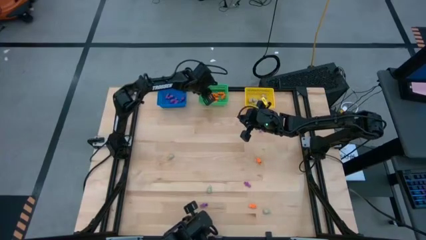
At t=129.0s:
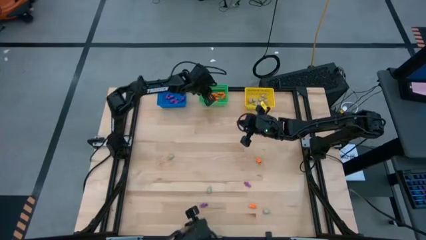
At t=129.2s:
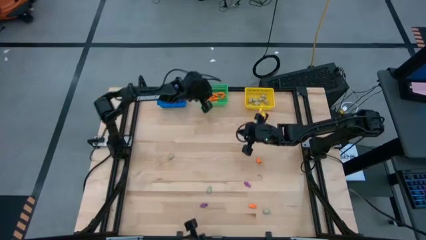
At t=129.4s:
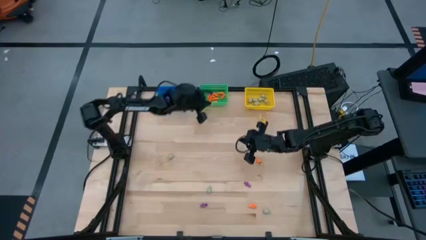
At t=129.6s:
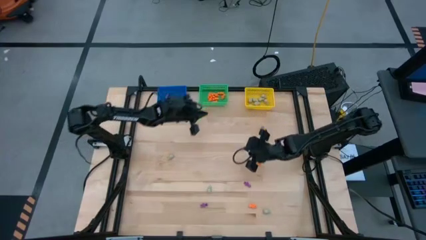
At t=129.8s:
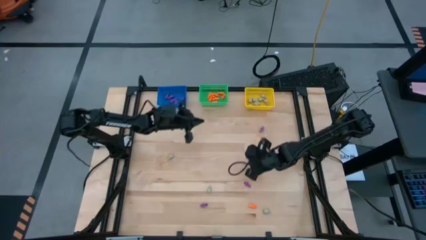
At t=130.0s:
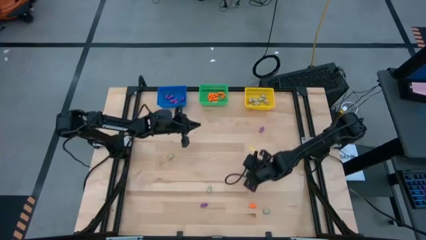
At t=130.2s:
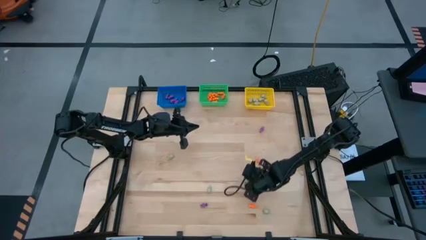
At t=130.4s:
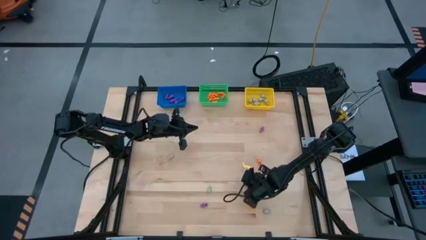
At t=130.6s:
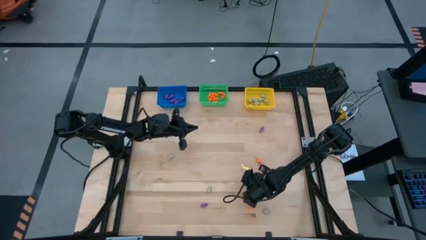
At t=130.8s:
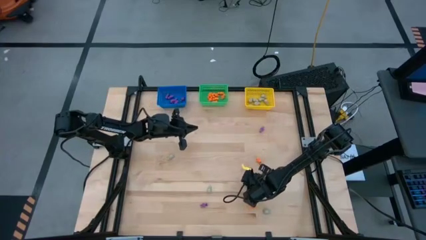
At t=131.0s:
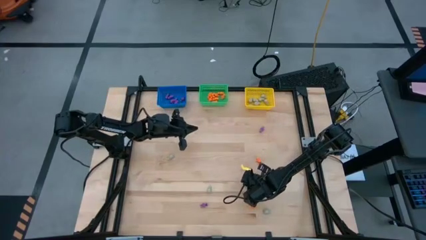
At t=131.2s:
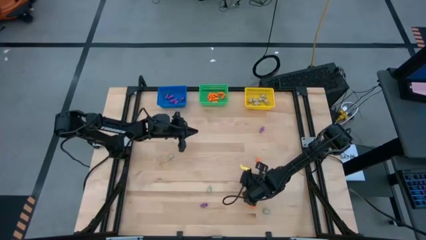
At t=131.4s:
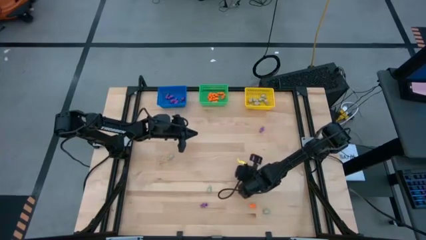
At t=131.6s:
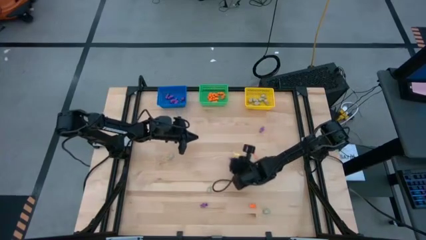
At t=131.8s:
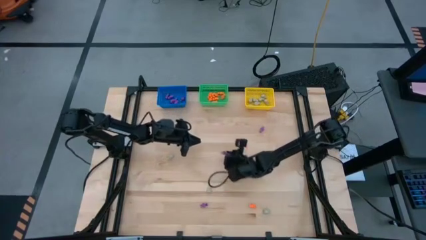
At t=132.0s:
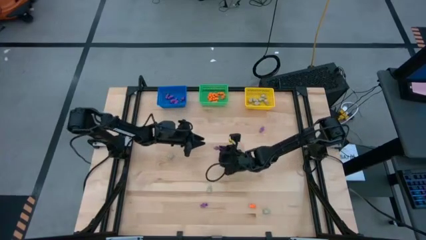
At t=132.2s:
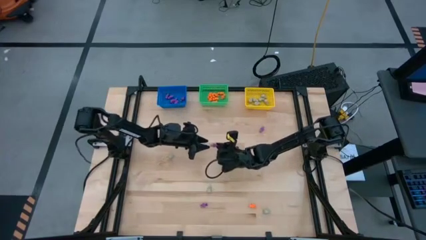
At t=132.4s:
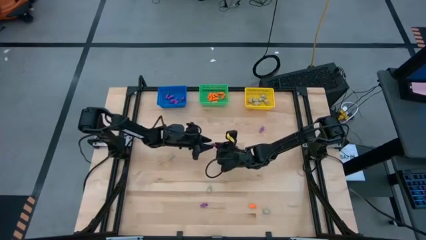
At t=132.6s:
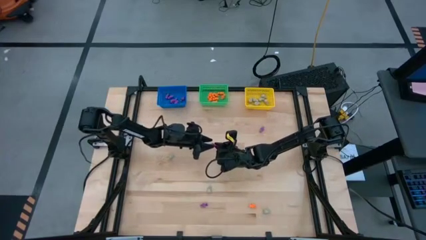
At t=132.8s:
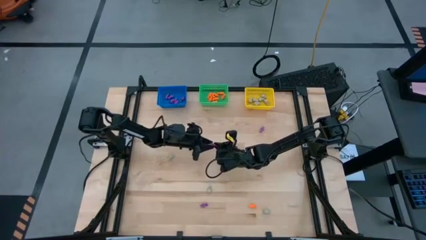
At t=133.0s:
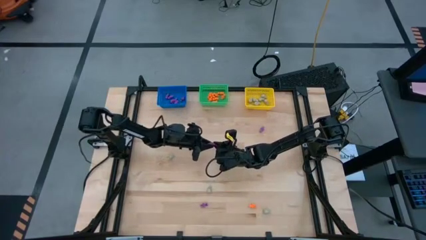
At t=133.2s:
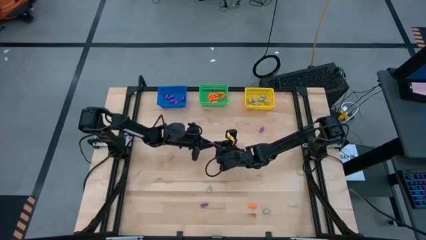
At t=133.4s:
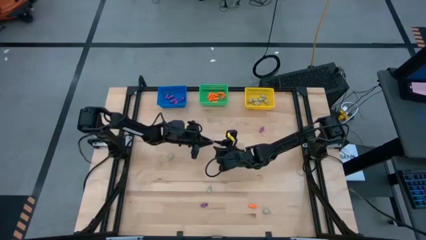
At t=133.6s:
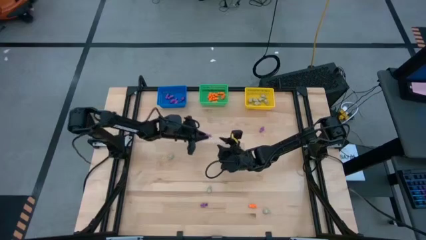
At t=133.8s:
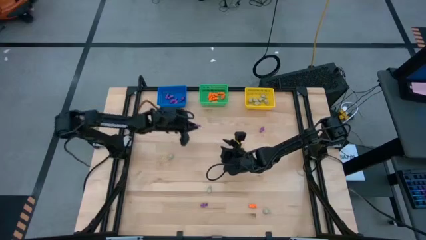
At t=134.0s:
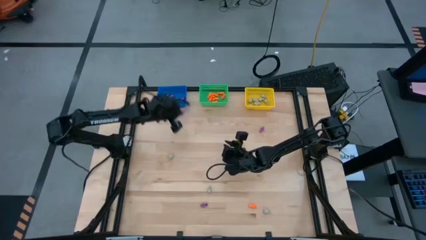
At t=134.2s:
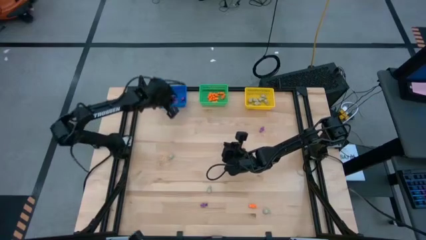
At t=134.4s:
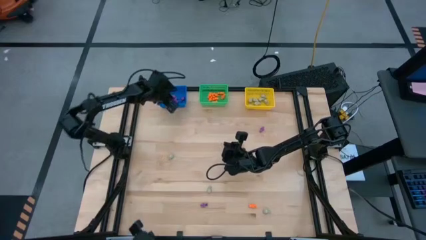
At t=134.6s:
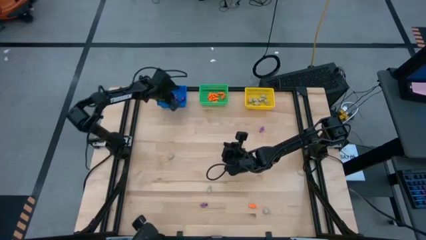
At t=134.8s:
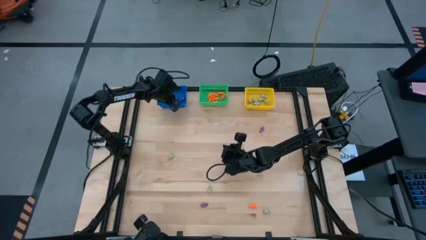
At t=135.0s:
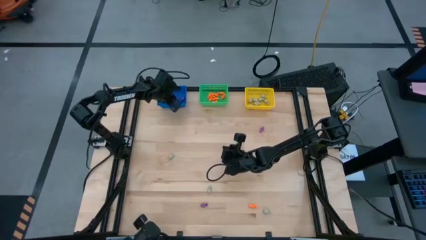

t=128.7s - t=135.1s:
Task: Sort Halloween decoration
Put the purple skeleton toy into the blue basket

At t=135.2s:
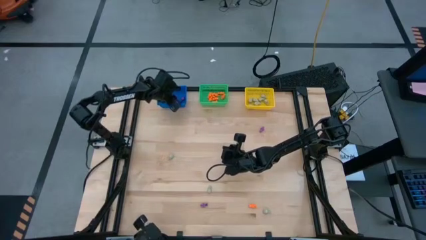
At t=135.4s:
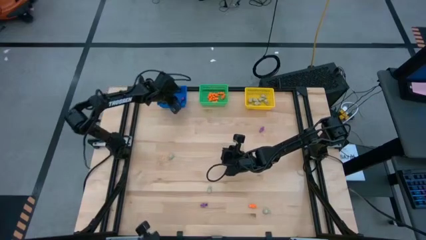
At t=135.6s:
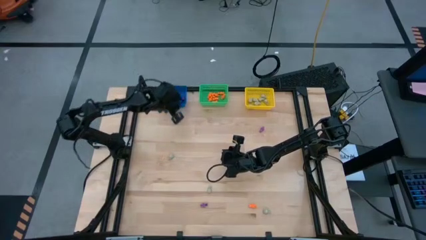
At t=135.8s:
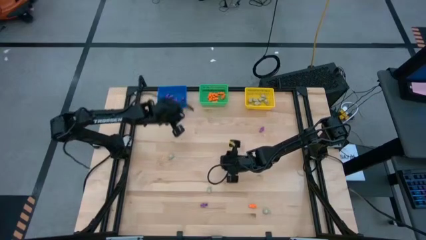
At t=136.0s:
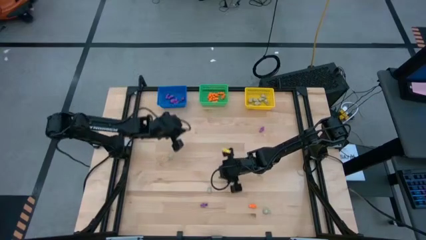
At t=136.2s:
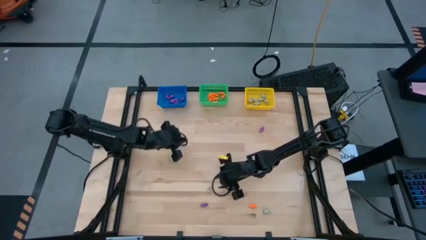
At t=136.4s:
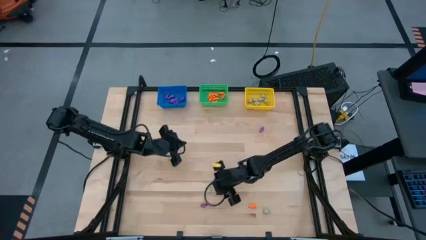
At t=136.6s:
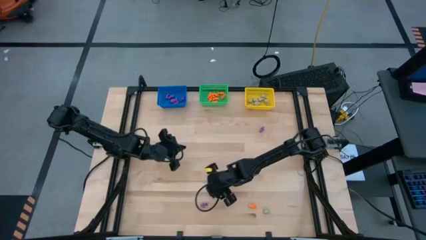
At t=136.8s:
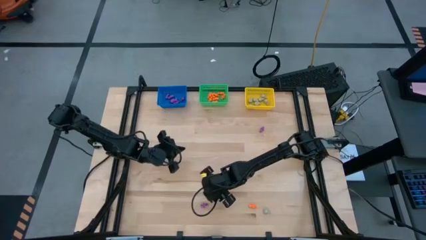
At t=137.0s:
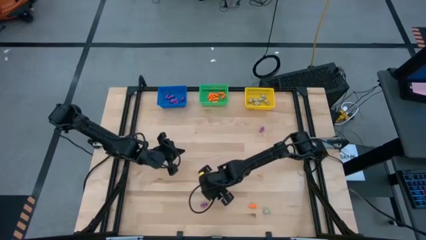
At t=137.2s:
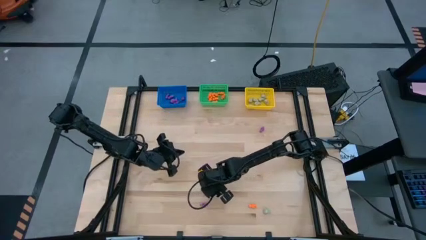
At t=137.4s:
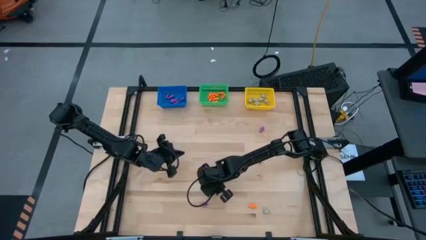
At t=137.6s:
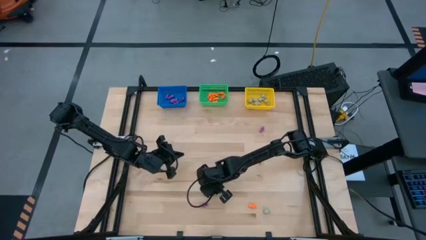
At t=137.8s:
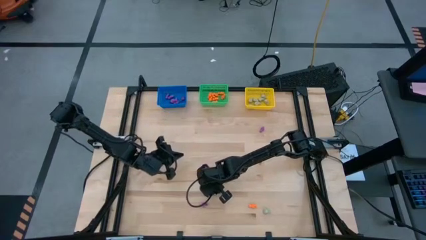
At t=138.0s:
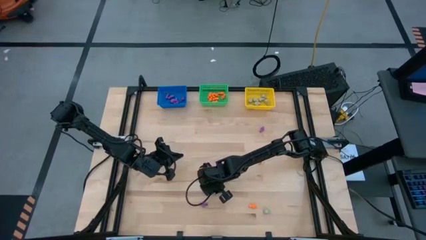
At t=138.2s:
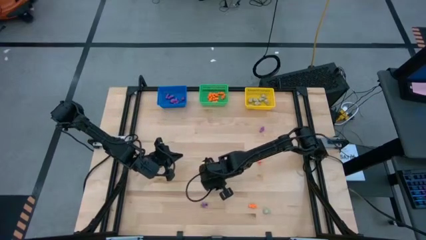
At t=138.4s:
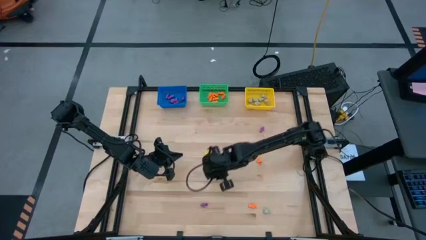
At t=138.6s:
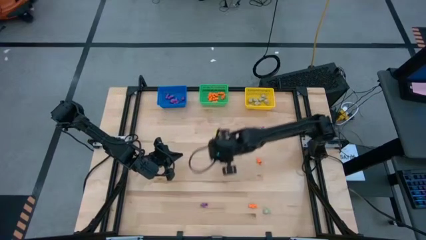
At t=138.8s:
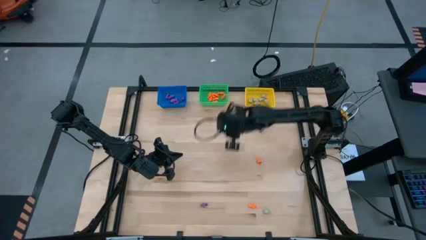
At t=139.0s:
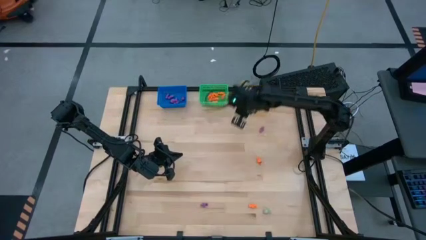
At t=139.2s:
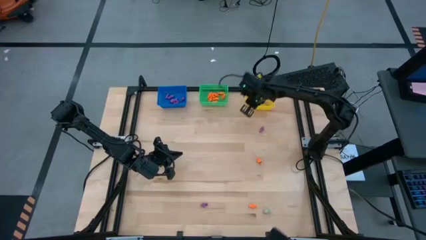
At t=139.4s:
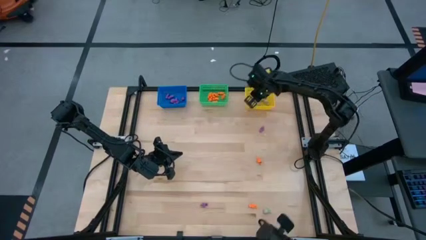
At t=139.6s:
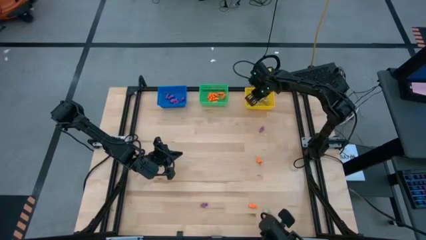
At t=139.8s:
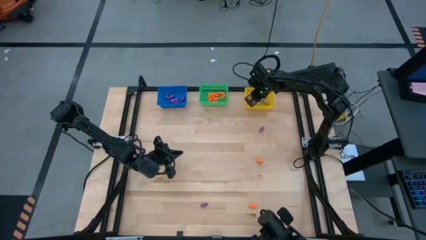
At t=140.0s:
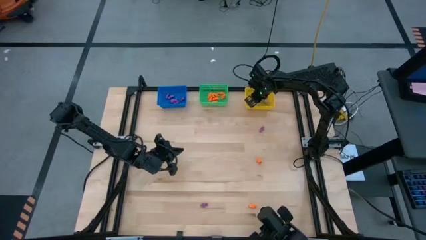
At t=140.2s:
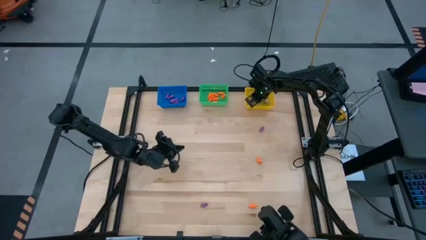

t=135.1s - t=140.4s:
Put the grey skull toy into the yellow basket

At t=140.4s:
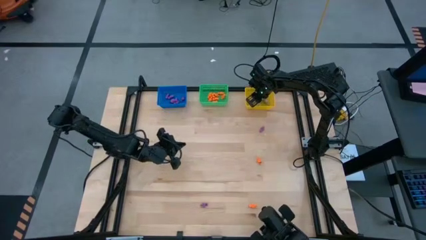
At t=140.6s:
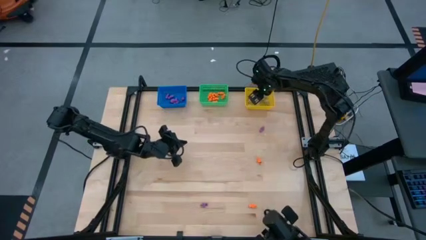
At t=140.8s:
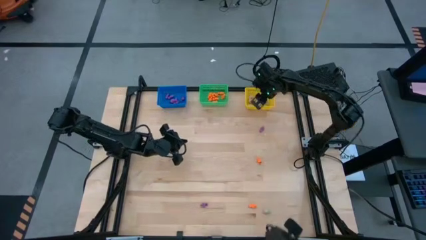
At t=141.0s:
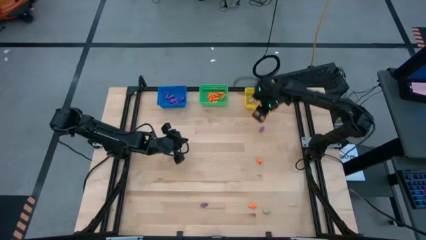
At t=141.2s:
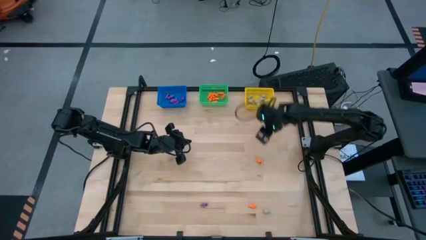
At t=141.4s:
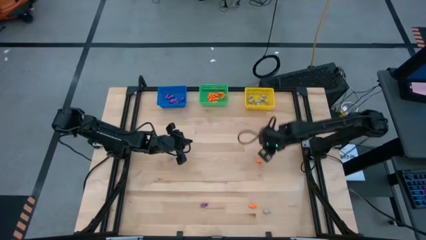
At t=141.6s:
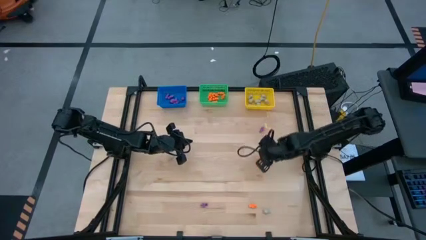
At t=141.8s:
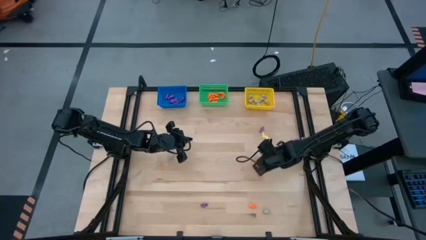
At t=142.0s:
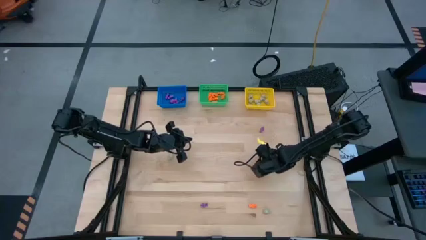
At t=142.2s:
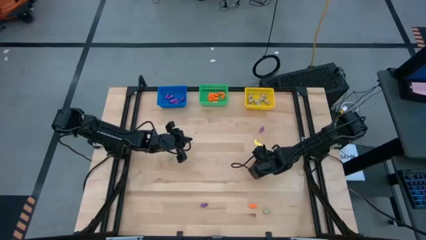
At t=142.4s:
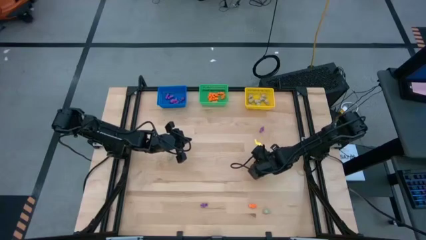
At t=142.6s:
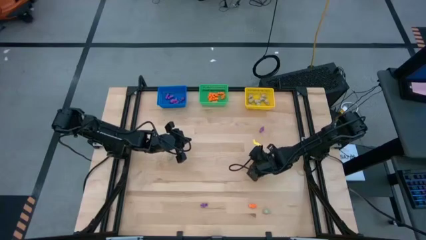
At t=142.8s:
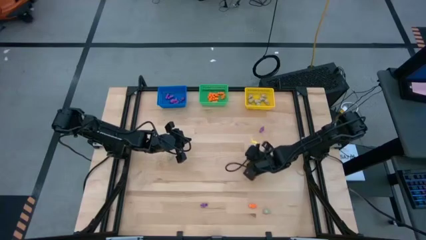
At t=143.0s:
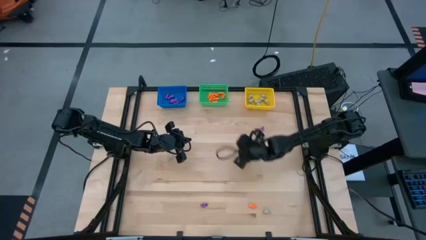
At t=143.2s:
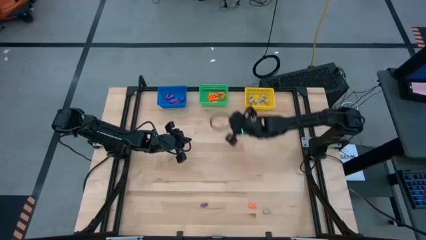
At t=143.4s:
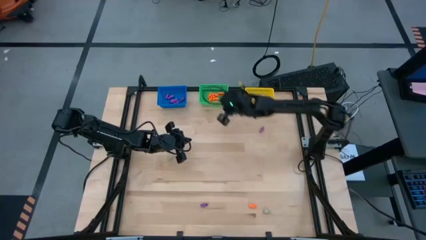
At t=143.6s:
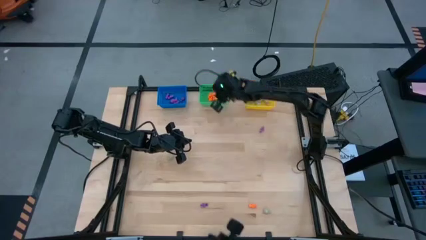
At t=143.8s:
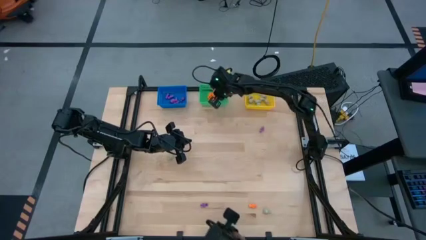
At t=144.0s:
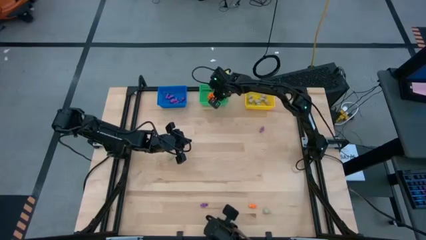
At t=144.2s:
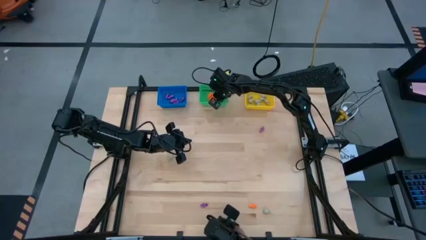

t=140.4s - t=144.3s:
Put the skeleton toy into the green basket
